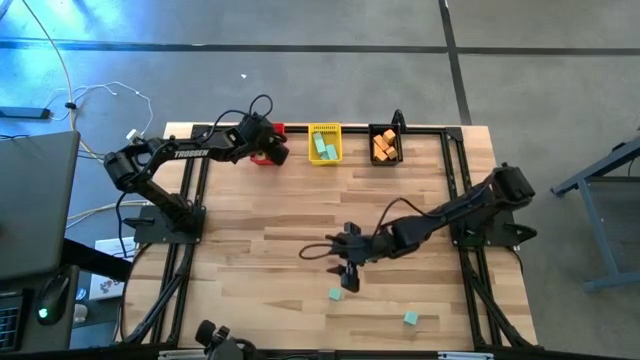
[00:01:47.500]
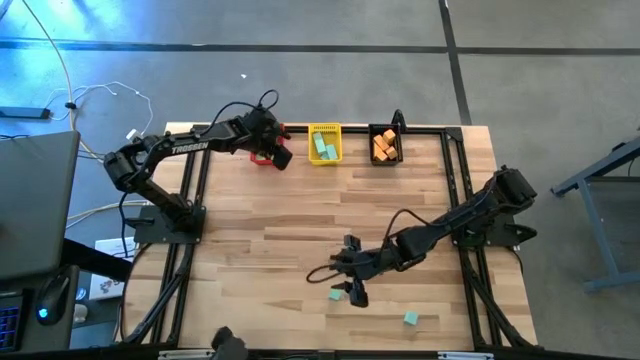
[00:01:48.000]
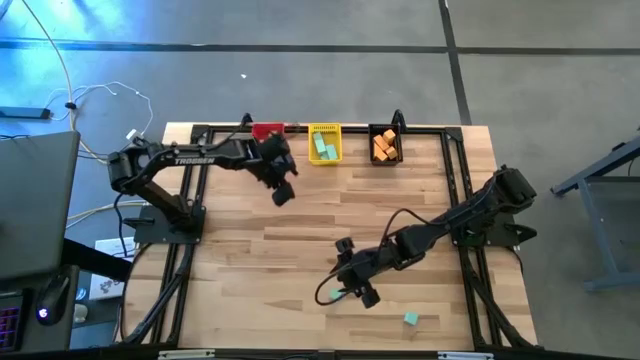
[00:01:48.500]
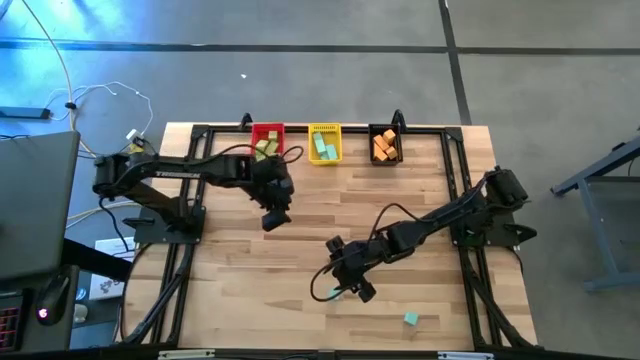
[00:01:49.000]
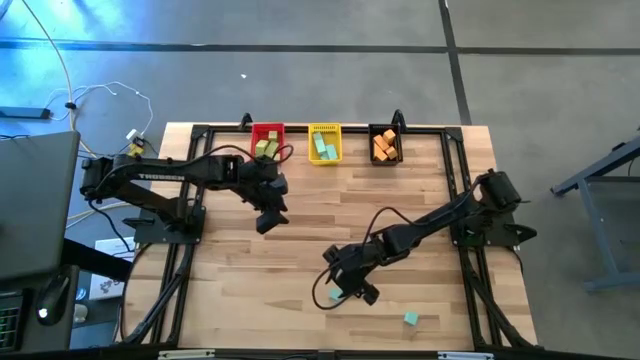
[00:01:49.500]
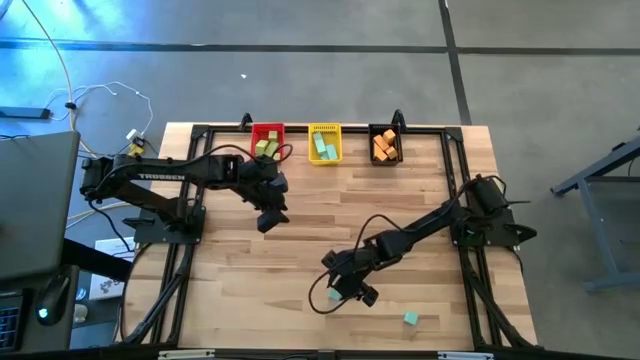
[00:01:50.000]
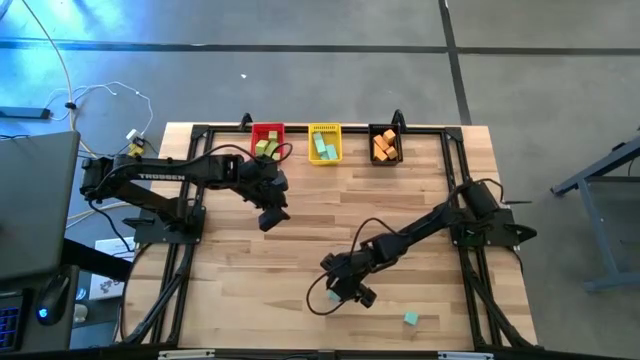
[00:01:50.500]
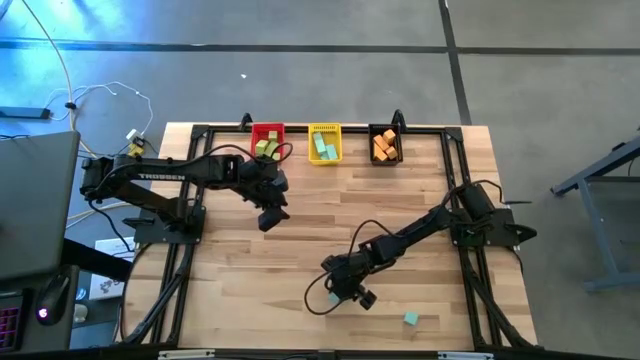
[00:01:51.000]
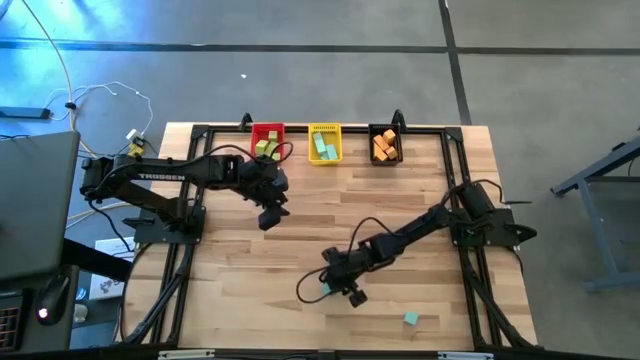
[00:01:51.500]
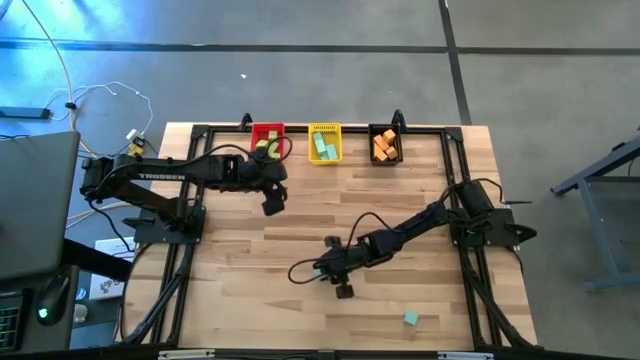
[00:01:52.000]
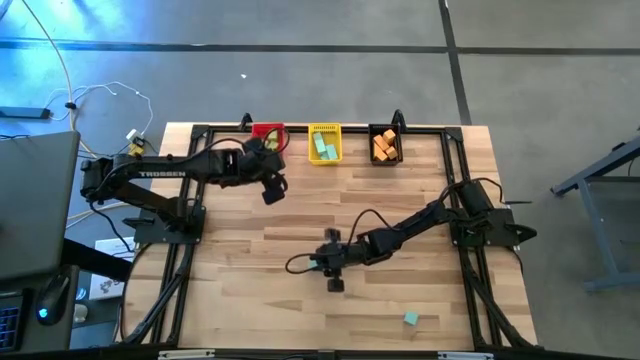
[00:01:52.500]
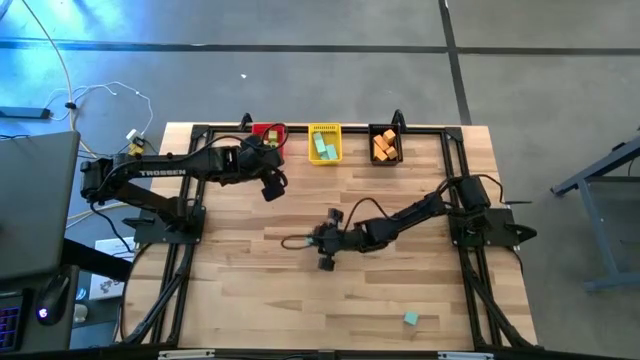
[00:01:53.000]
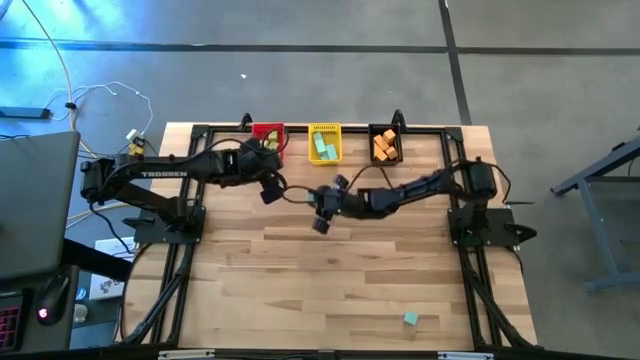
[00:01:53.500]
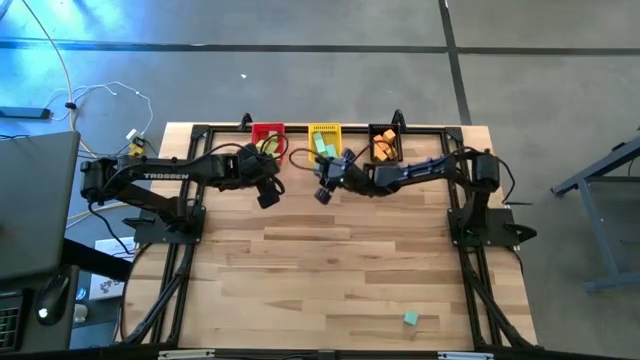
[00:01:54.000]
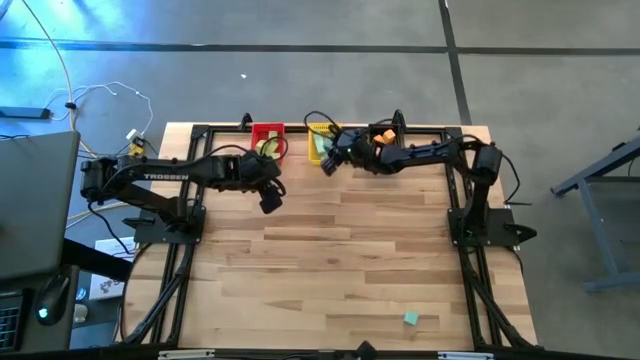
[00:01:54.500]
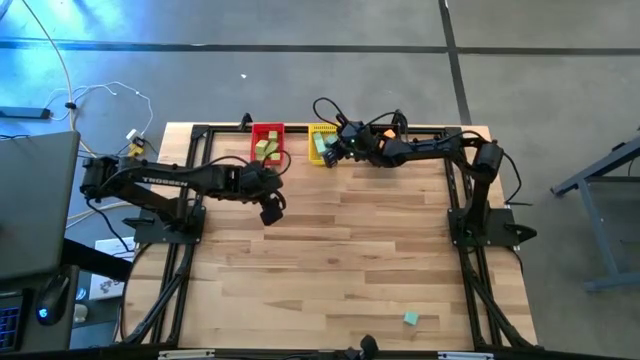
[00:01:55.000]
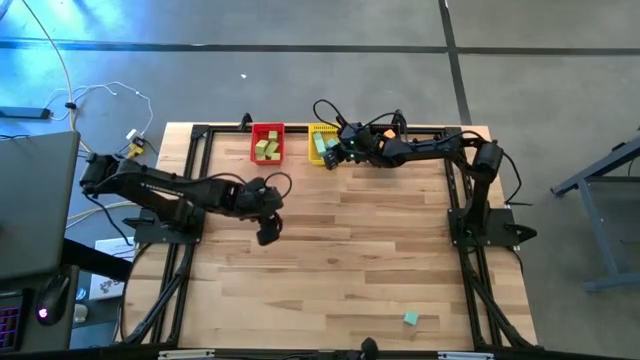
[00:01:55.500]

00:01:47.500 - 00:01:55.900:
Task: Sort & place blocks by color
Put the blue block into the yellow basket

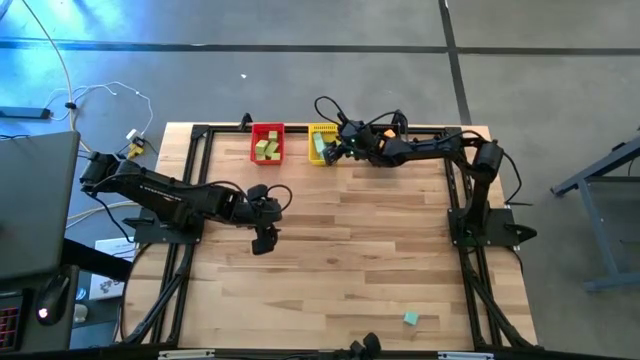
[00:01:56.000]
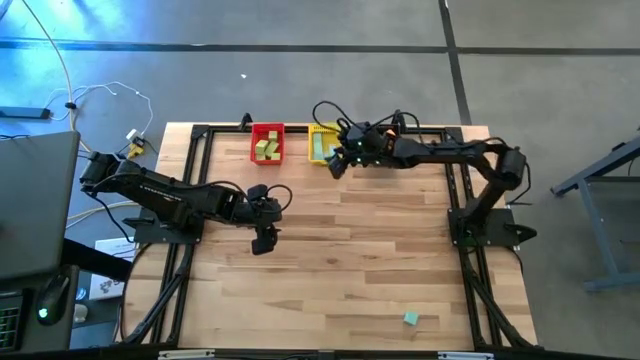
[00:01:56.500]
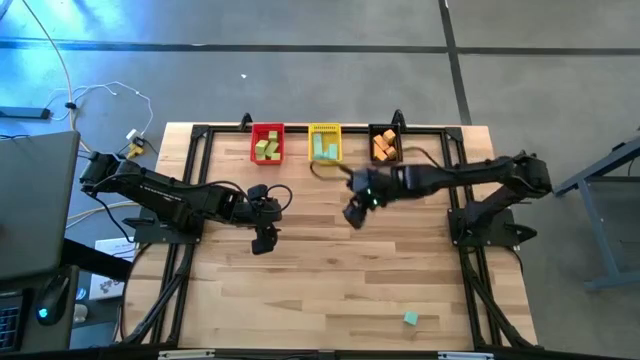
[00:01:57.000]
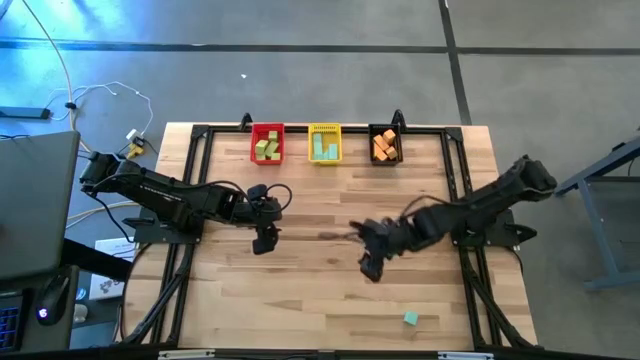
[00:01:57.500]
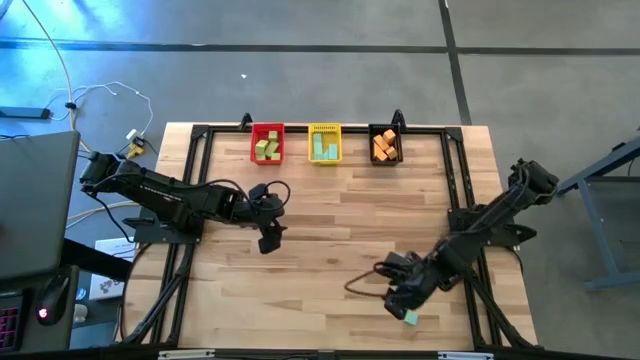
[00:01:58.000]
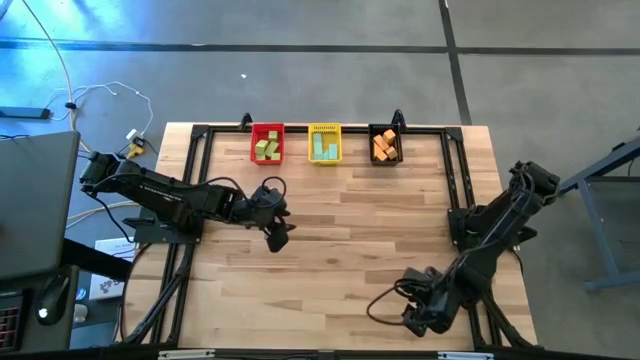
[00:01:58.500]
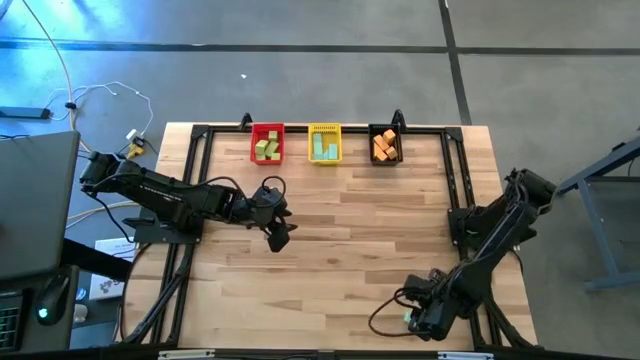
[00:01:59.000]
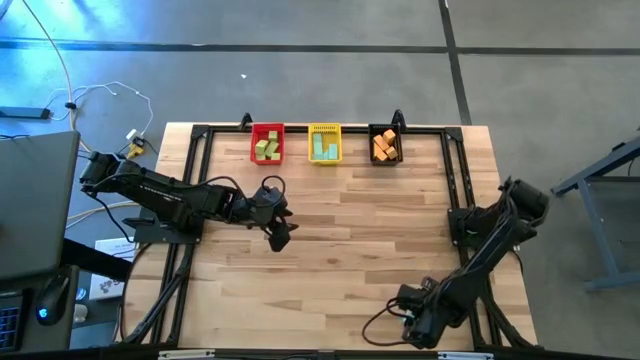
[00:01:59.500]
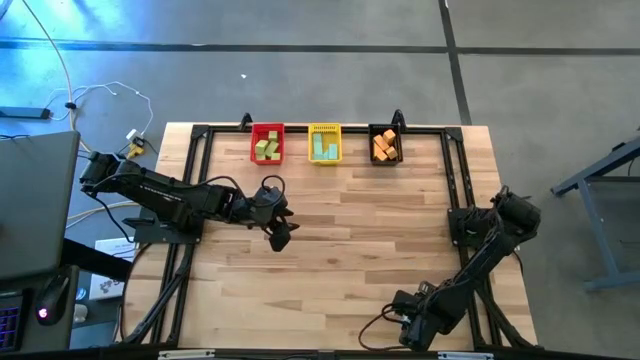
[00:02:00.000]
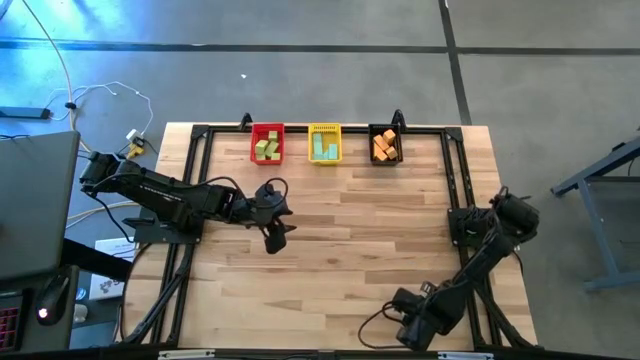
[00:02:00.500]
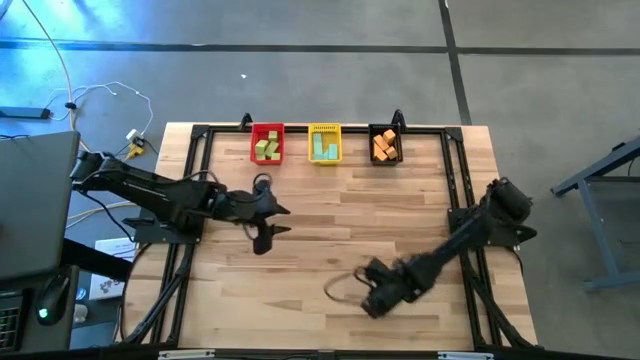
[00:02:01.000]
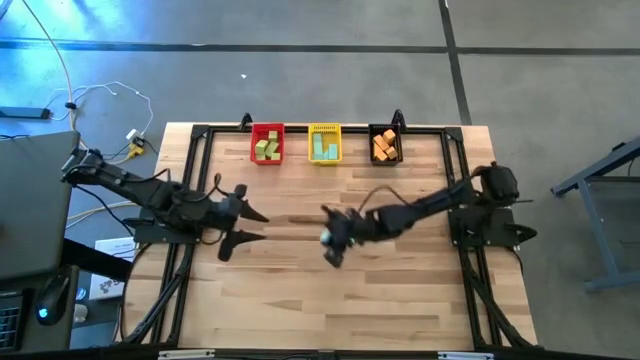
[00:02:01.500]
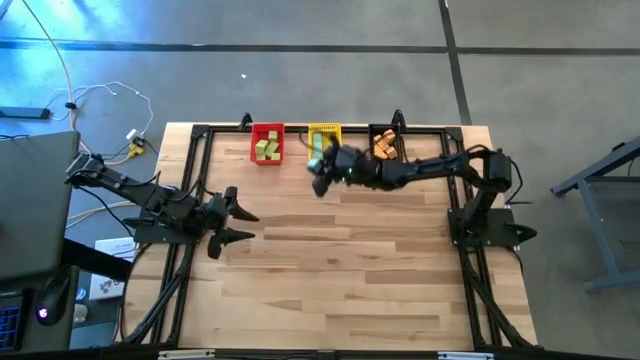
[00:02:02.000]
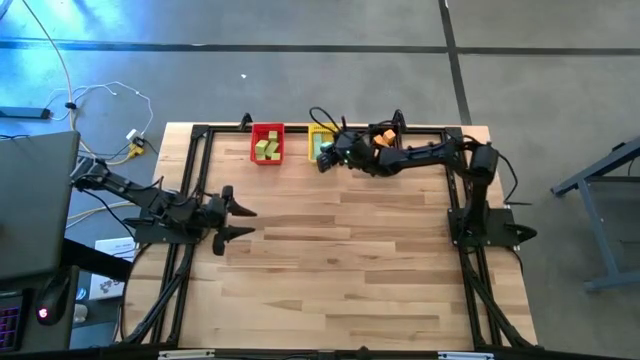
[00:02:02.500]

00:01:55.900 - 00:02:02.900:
Put the blue block into the yellow basket

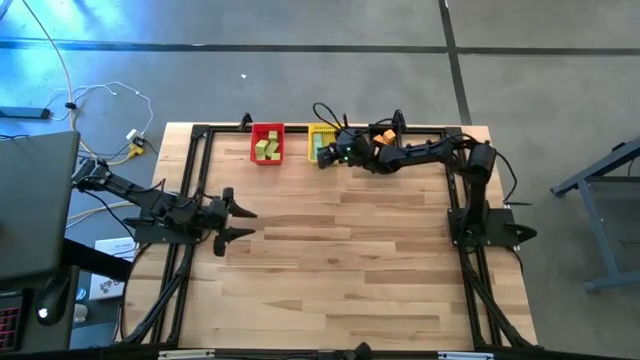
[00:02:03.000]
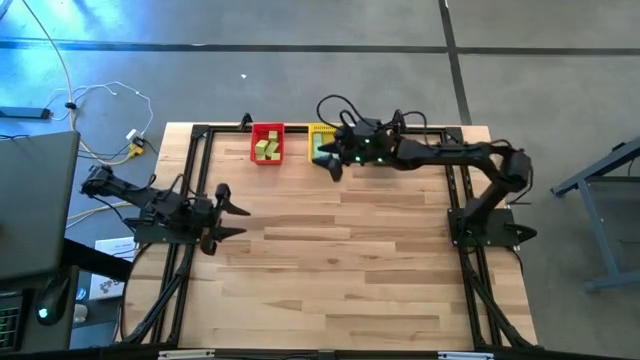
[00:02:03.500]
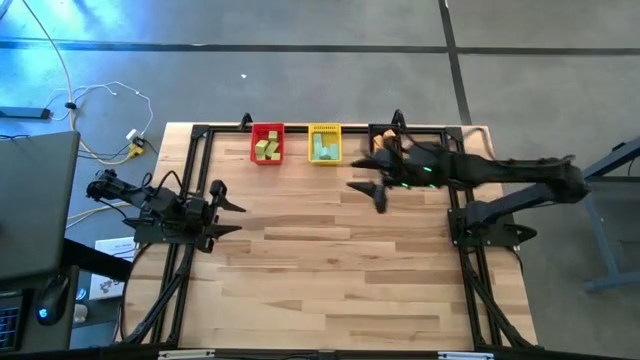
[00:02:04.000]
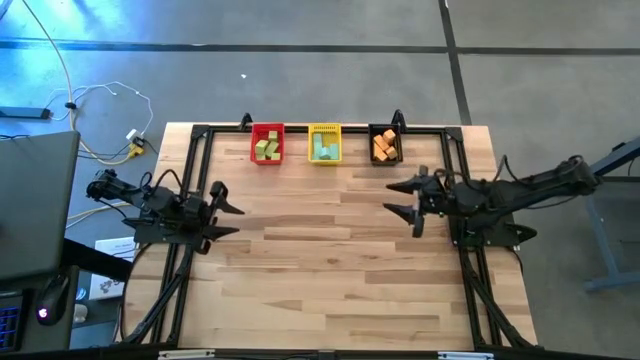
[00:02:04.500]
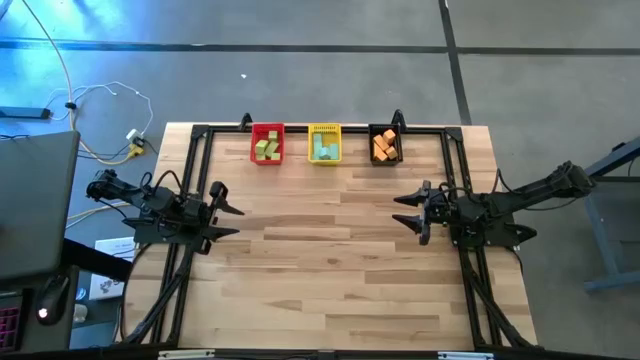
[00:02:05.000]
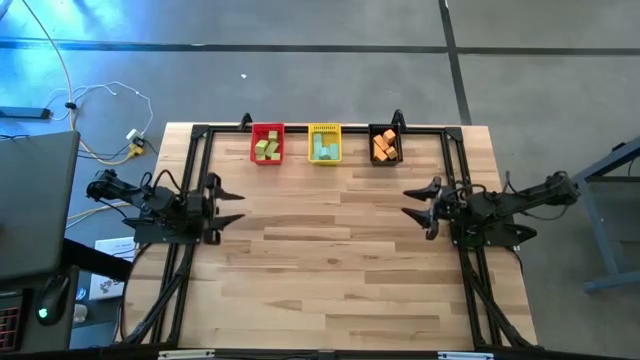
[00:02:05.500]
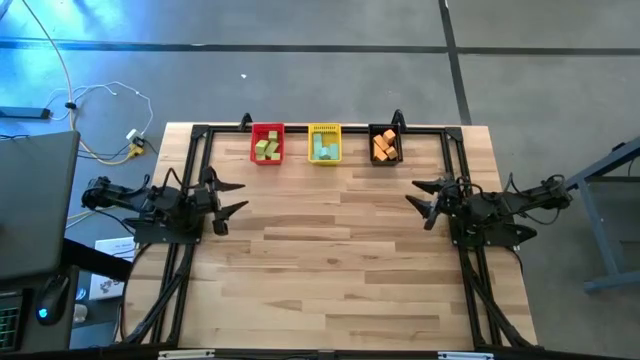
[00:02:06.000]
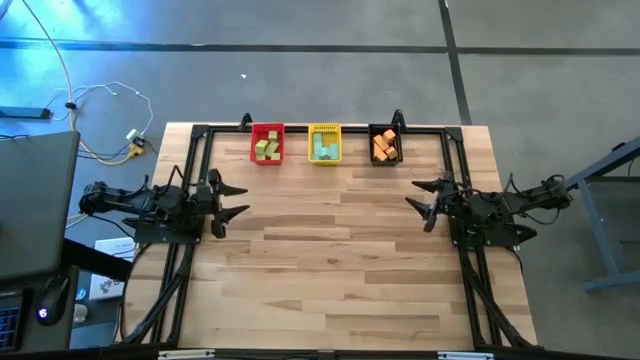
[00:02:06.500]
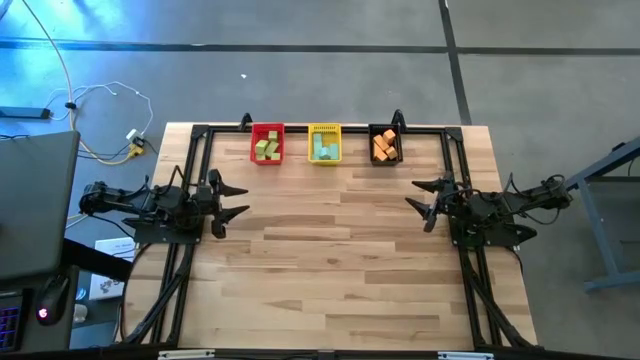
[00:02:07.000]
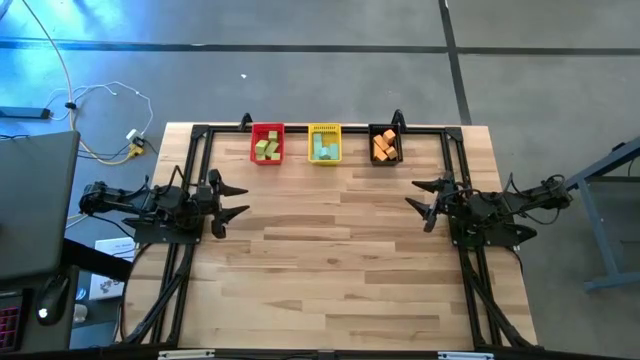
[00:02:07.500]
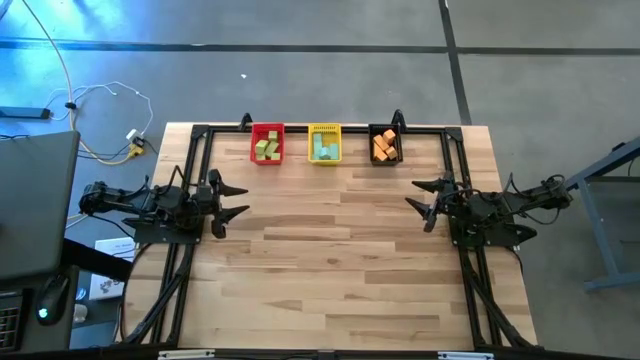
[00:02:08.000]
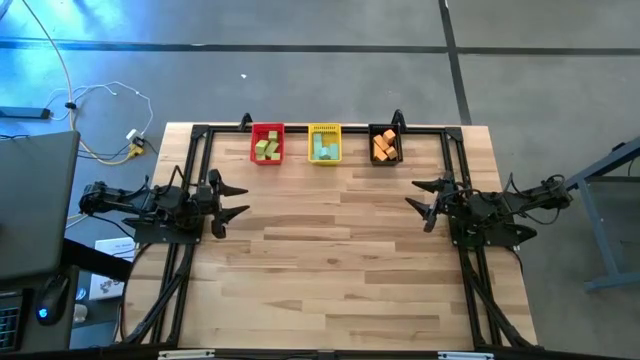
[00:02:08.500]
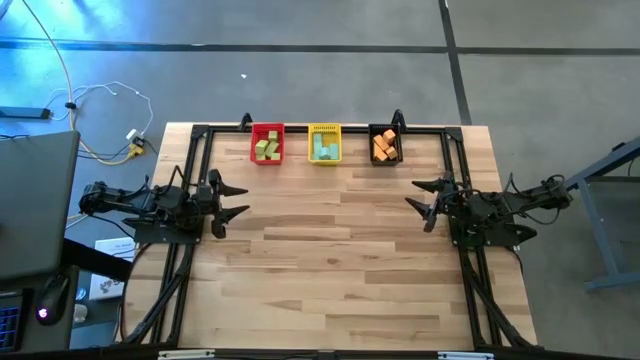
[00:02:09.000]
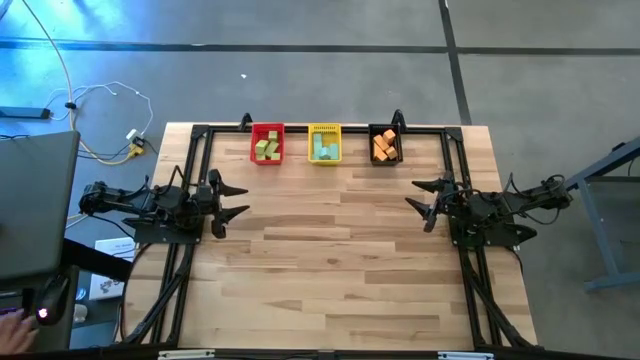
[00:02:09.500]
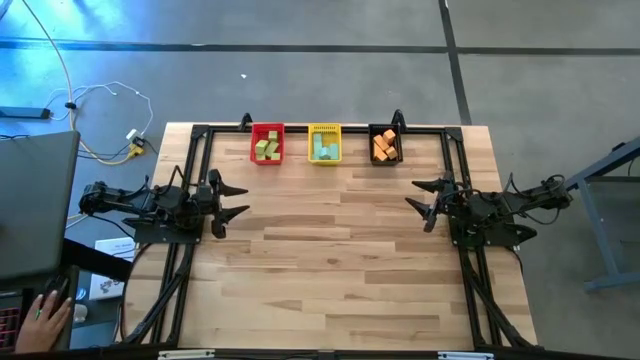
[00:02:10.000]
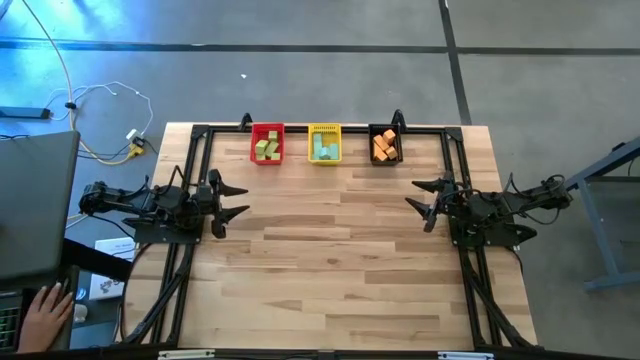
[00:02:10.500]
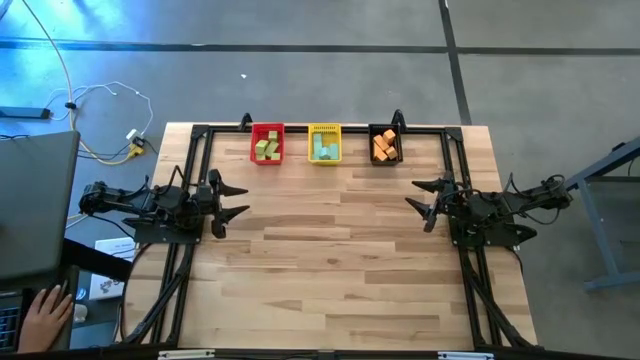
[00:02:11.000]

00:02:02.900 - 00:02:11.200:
Return to Home Position
